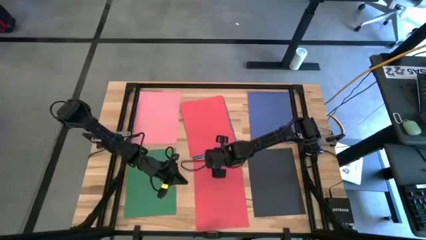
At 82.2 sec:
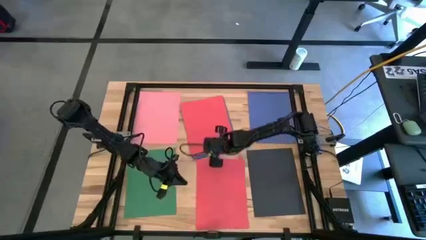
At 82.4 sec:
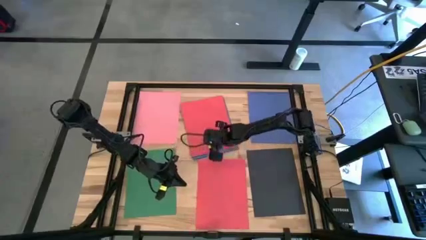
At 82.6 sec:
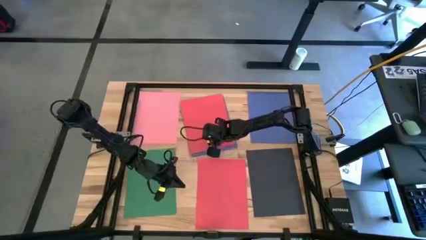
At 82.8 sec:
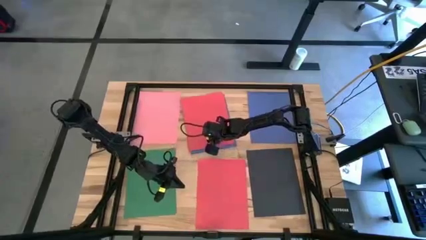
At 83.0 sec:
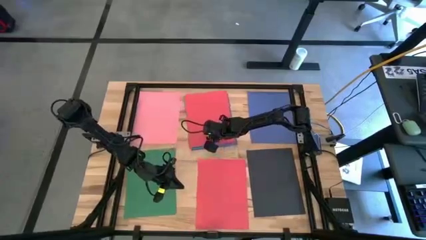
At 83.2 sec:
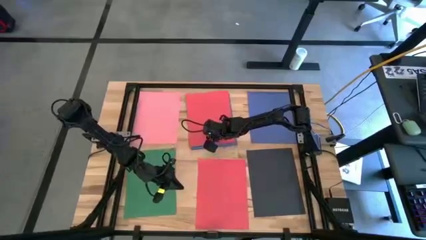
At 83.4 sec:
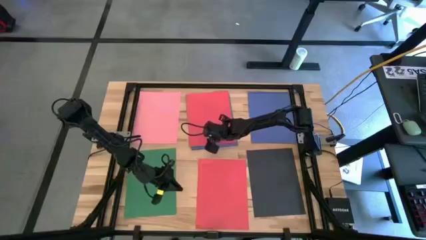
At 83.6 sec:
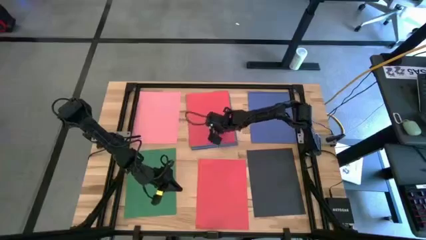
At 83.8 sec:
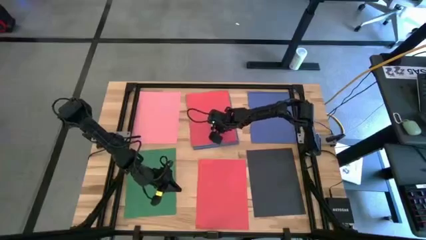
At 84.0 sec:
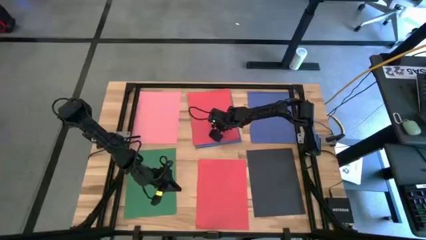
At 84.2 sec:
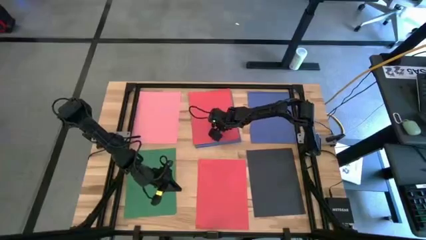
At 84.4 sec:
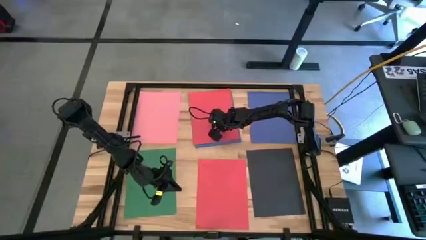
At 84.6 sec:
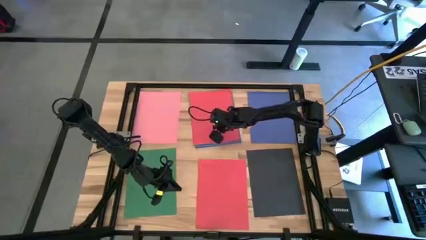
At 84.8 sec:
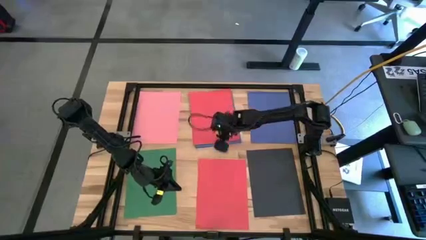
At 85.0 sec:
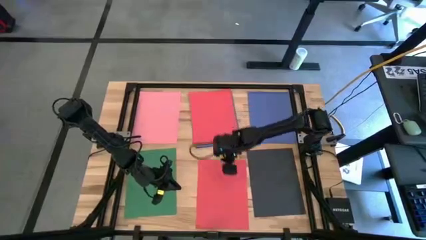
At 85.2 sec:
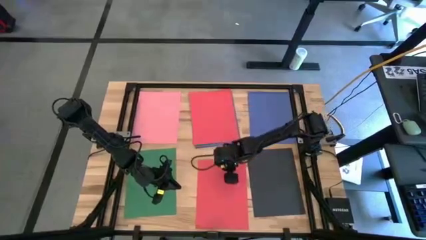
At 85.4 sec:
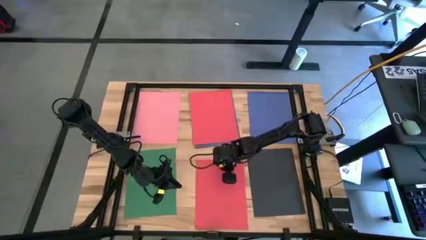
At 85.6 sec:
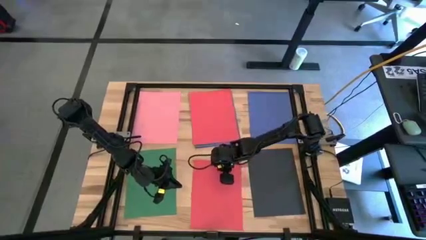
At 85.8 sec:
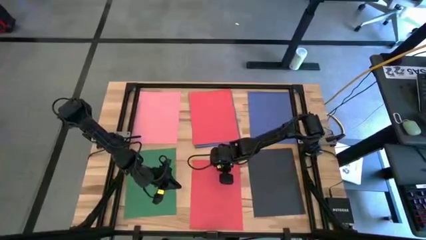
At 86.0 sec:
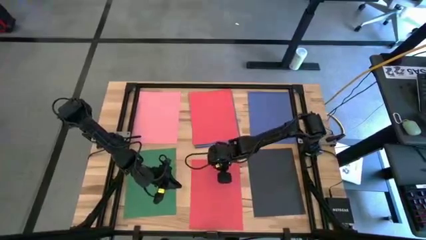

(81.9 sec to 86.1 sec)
Task: Organize paper
Adjust the stacked colored papers on the table

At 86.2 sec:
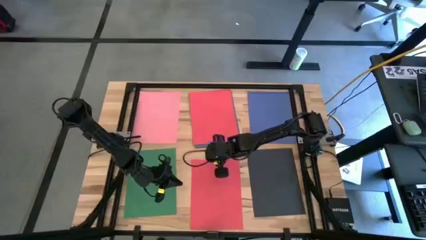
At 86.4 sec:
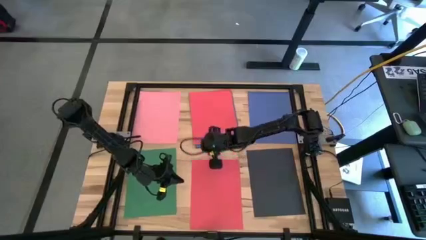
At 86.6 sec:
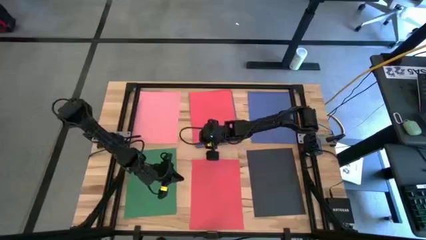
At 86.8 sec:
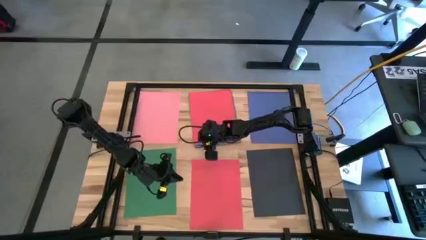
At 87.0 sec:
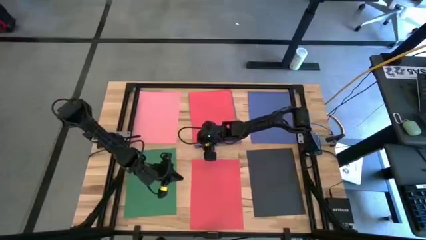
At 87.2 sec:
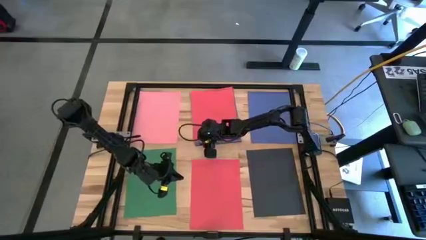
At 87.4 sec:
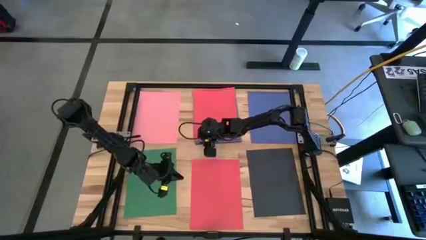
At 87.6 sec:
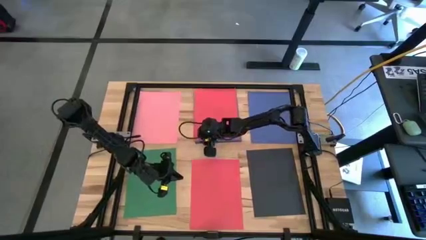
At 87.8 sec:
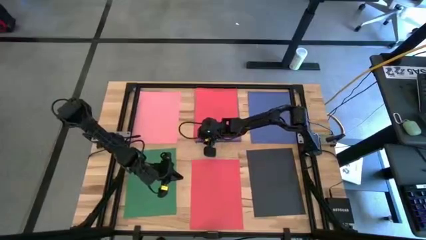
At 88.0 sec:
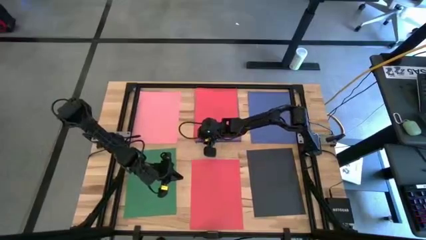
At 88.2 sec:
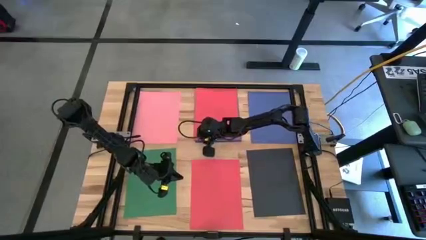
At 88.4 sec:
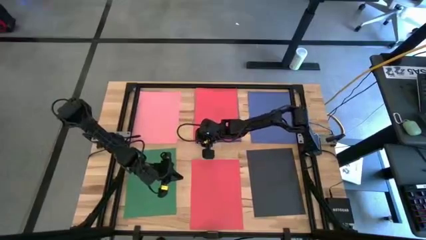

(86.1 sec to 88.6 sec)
Stack the red paper on top of the red paper

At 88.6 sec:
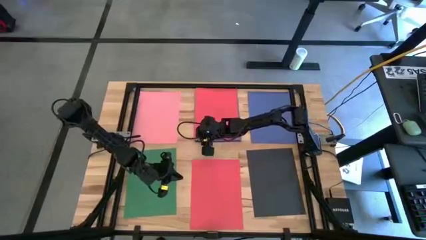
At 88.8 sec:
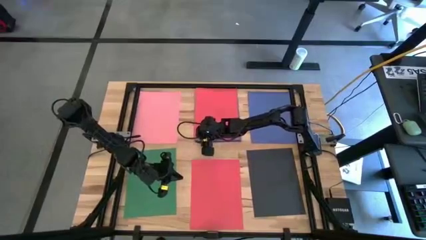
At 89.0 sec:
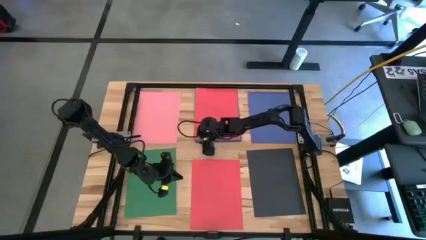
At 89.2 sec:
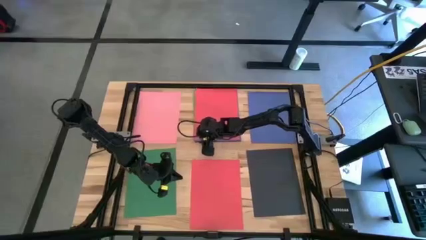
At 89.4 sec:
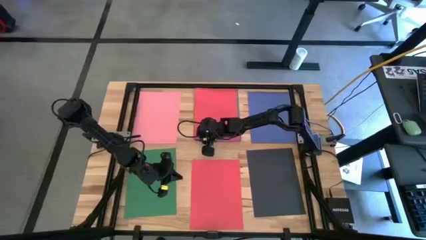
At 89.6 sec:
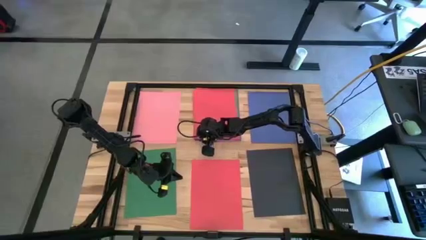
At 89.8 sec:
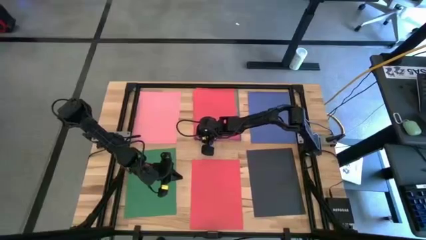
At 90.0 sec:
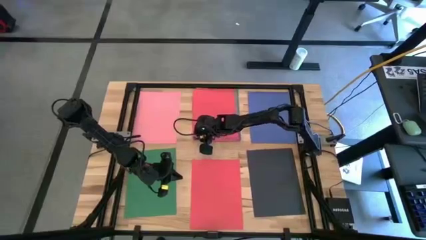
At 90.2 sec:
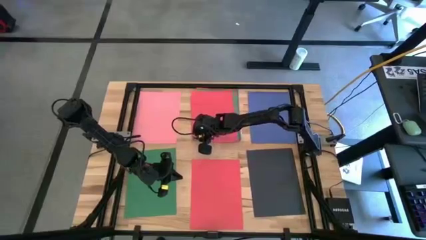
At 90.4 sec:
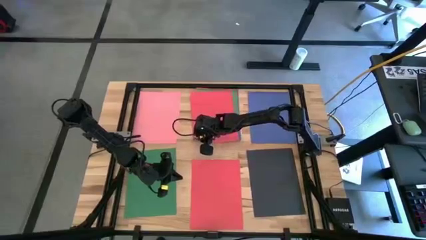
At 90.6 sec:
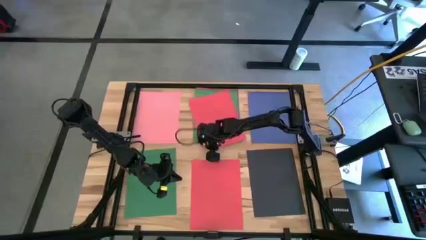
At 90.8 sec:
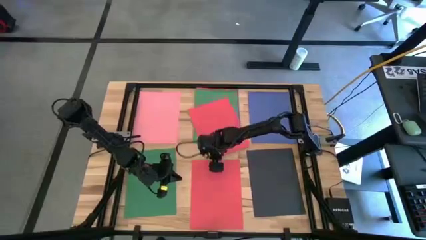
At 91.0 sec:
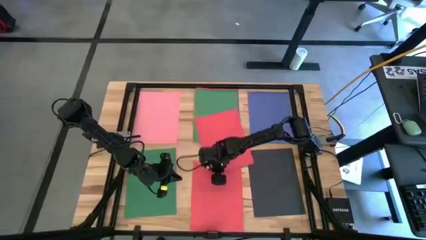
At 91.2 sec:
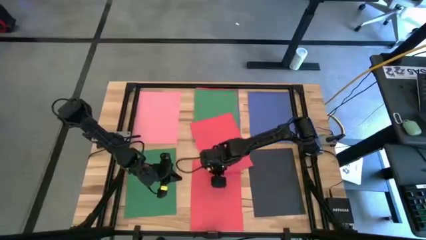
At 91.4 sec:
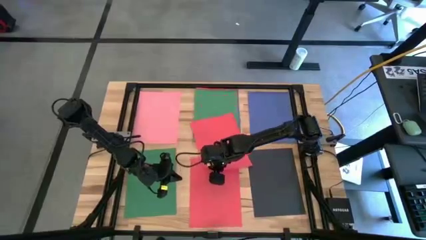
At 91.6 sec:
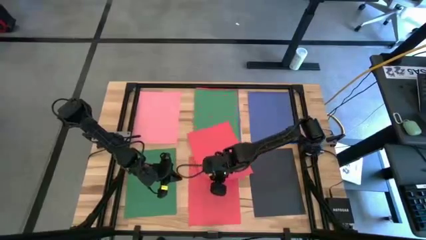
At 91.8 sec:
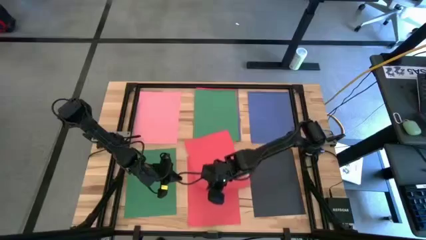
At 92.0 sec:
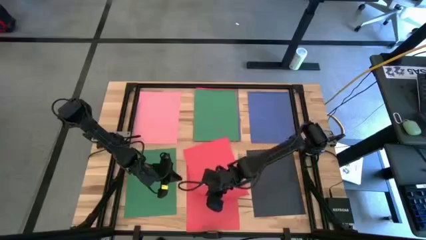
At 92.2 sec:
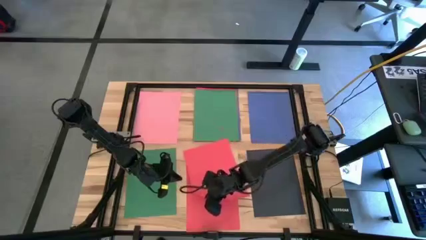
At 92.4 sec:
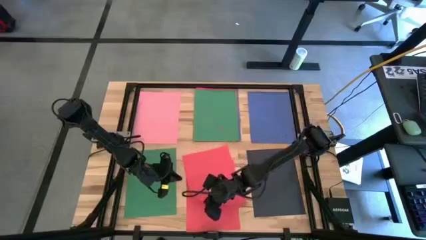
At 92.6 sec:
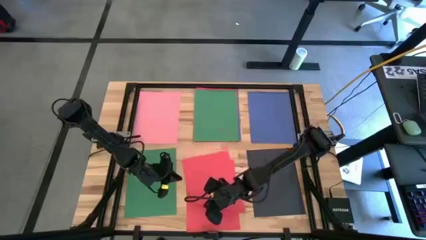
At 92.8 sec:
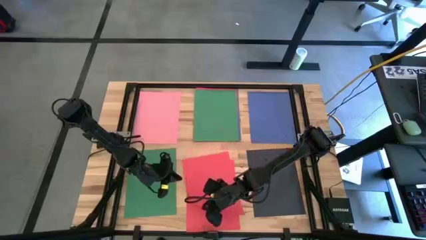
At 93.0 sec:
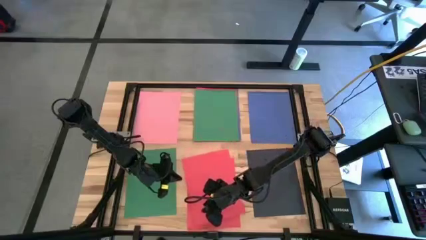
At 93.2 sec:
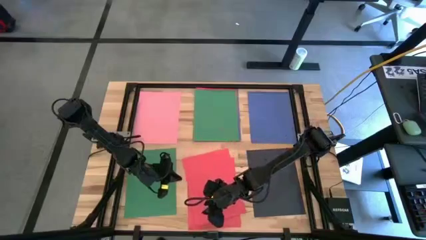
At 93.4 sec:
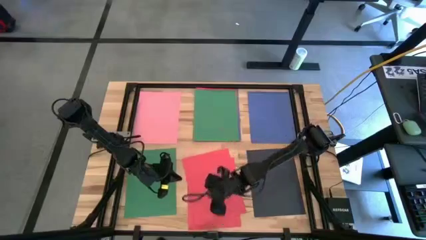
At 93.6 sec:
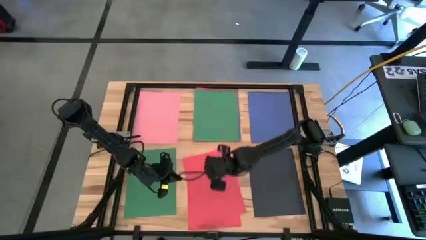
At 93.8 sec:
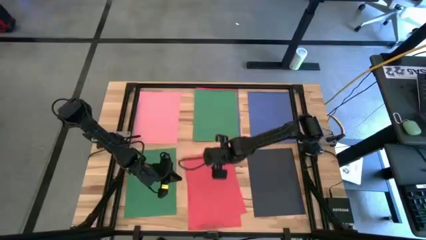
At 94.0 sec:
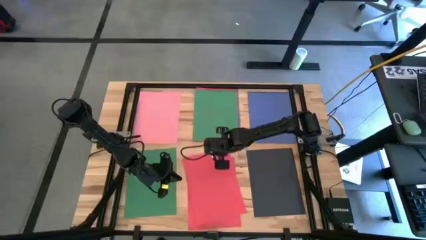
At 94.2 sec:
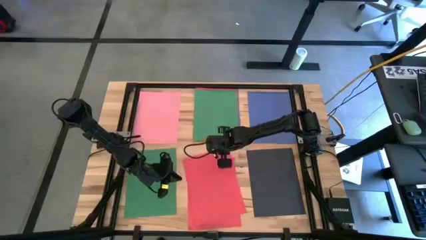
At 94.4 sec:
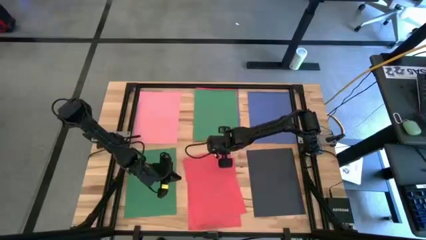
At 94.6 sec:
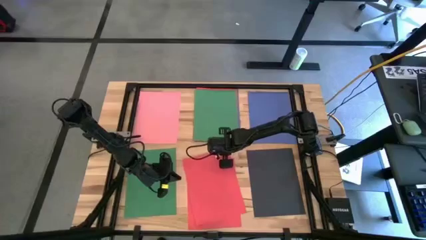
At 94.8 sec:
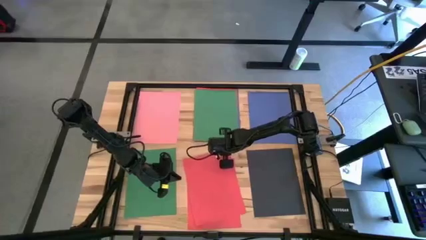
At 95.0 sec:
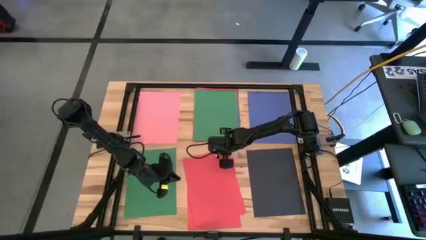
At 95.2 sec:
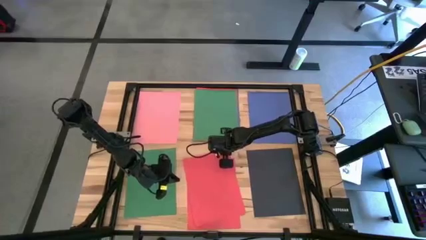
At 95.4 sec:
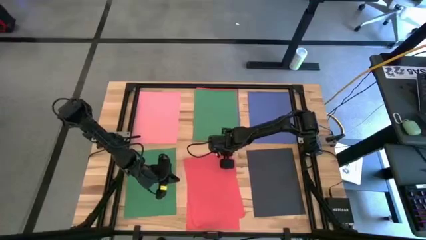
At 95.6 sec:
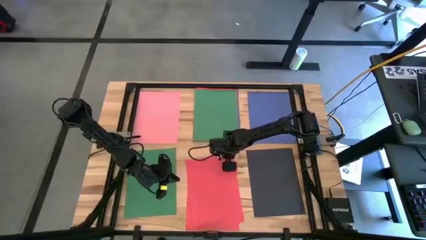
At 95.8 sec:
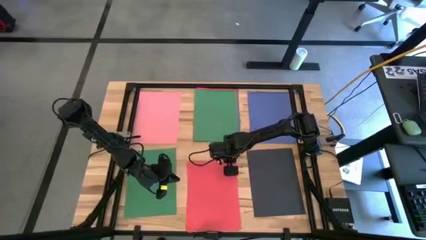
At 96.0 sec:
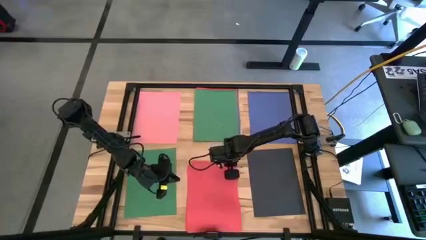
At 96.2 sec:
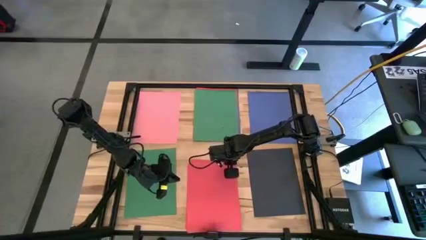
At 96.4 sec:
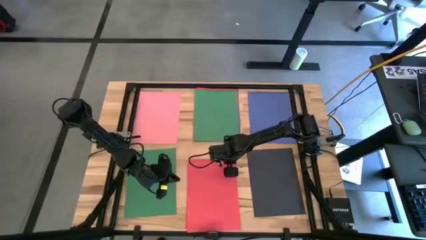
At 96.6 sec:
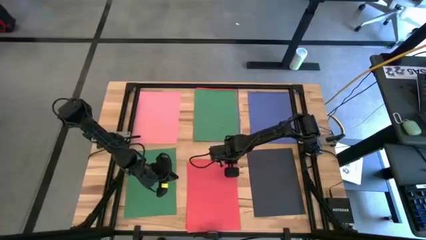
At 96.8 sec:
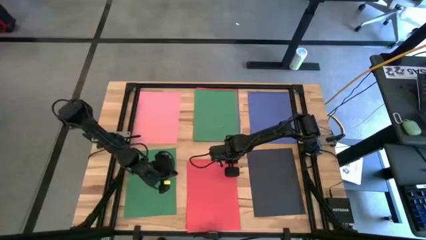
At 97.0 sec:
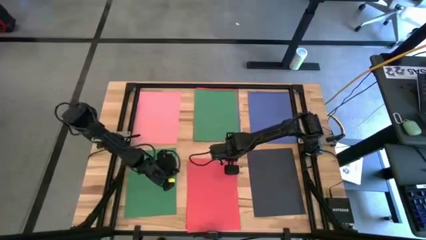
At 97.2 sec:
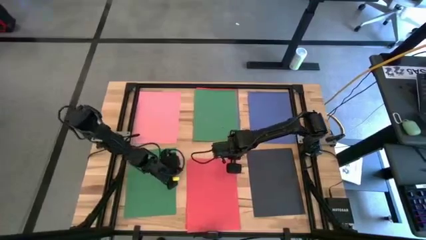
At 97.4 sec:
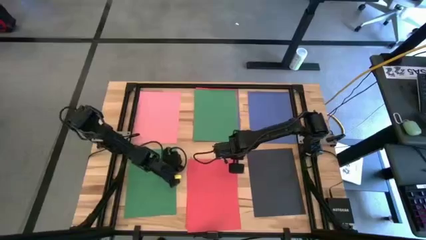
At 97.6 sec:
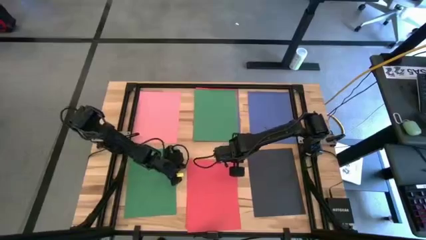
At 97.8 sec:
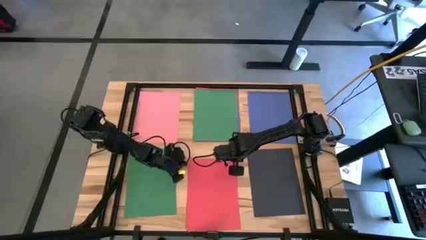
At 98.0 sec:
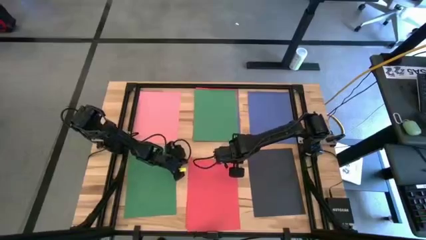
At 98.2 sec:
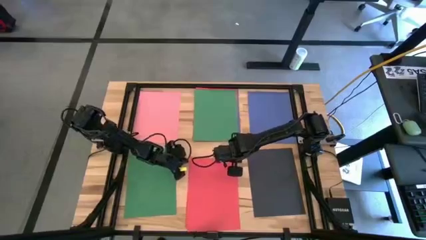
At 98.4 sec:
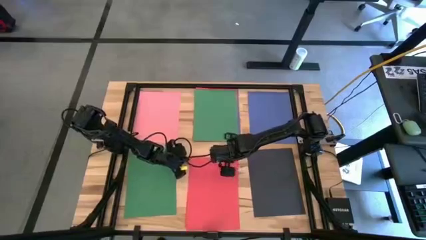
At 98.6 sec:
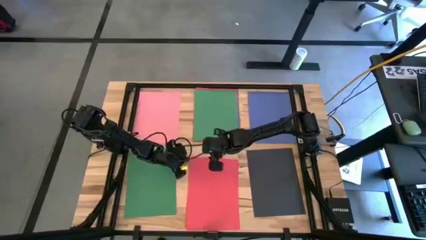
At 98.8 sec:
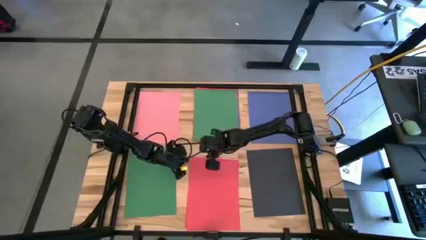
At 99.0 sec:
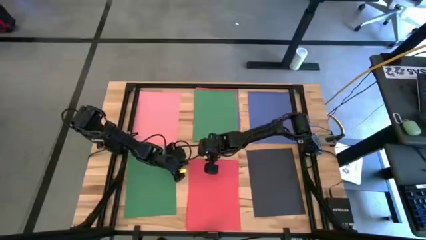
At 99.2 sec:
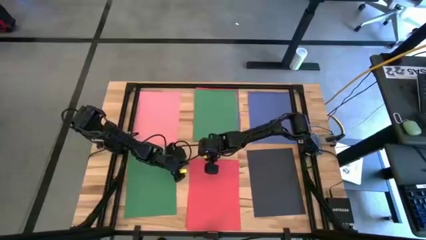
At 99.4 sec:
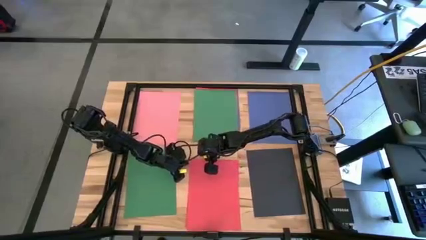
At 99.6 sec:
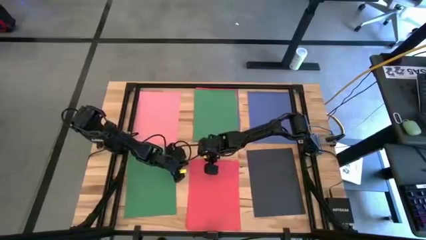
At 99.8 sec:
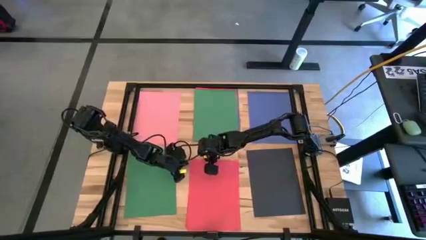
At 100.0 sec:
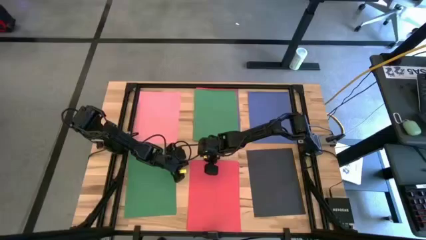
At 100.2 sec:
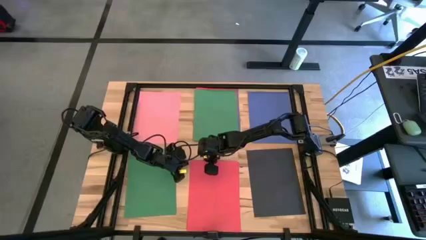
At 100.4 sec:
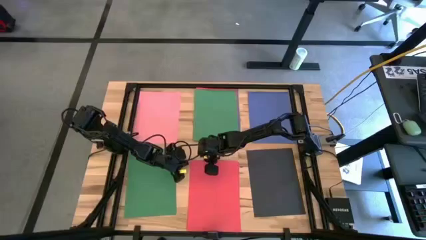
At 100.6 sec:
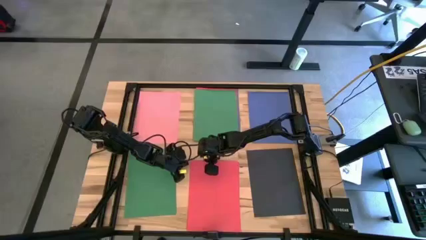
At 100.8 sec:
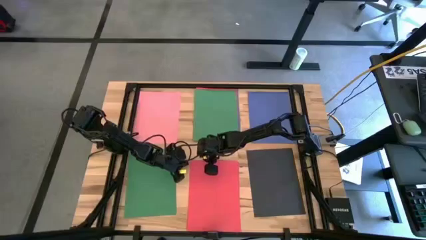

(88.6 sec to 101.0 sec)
Stack the red paper on top of the red paper
